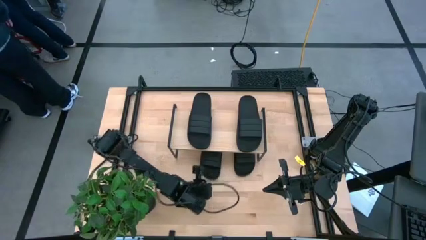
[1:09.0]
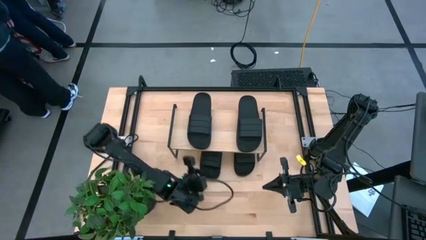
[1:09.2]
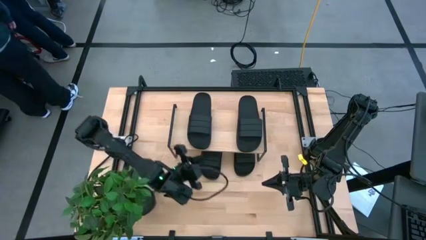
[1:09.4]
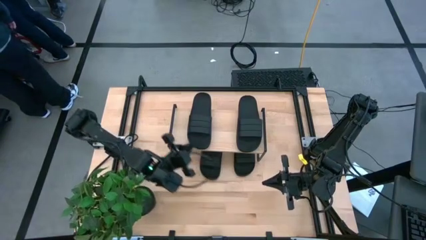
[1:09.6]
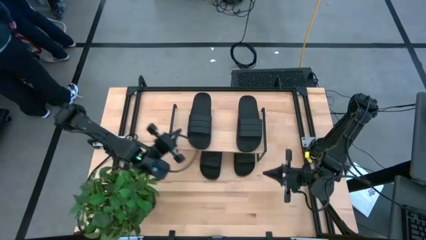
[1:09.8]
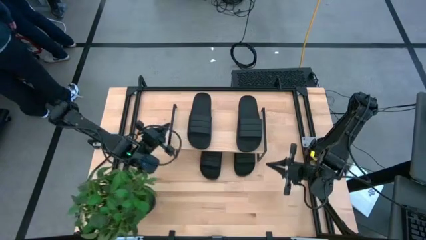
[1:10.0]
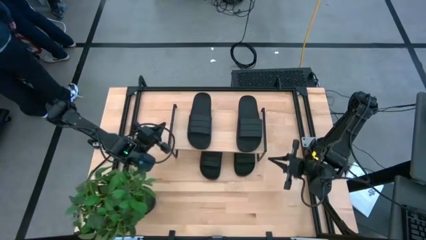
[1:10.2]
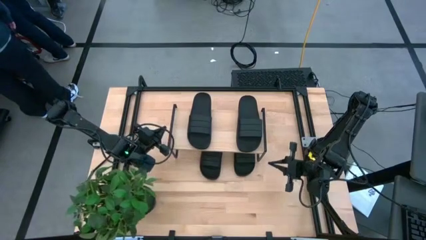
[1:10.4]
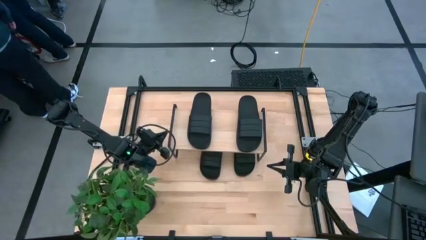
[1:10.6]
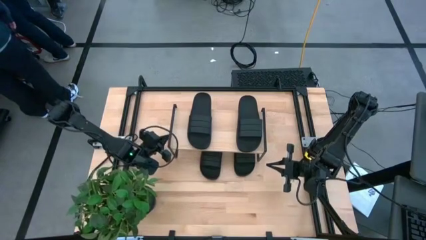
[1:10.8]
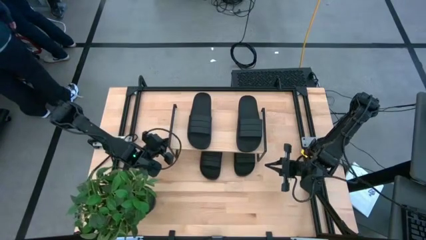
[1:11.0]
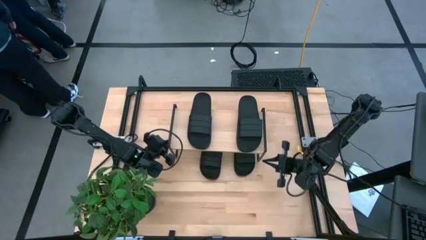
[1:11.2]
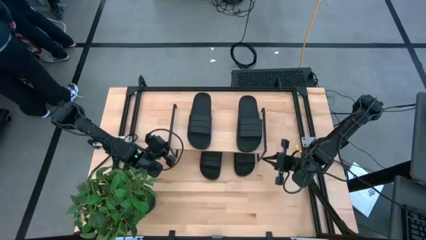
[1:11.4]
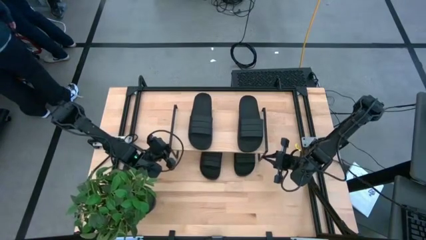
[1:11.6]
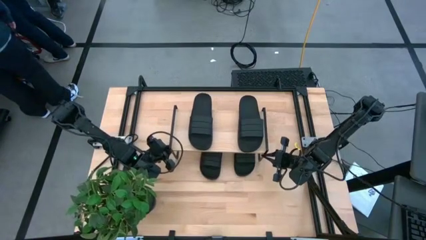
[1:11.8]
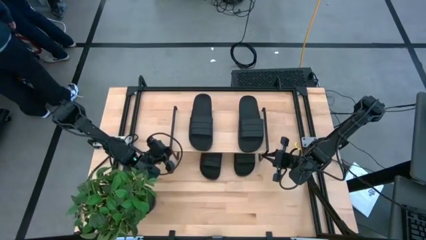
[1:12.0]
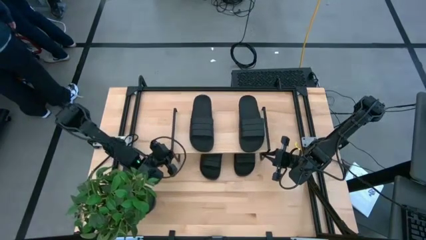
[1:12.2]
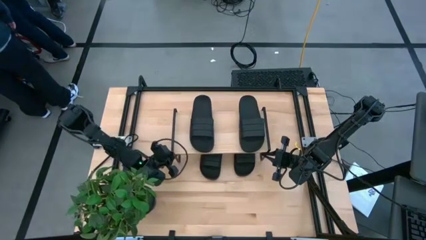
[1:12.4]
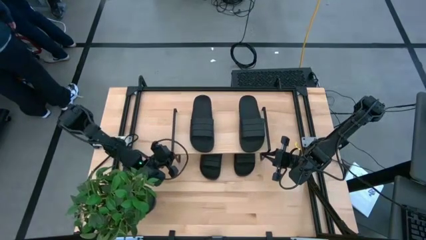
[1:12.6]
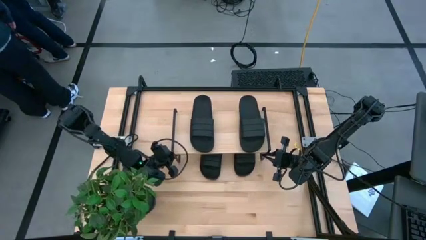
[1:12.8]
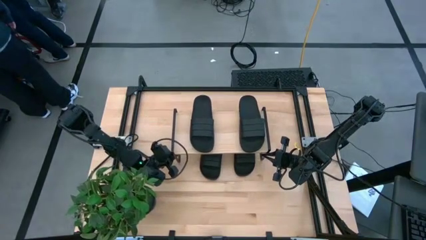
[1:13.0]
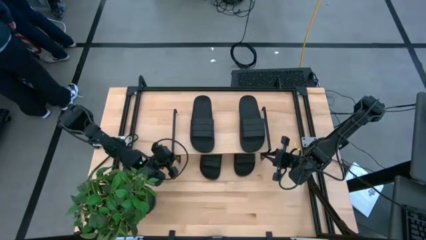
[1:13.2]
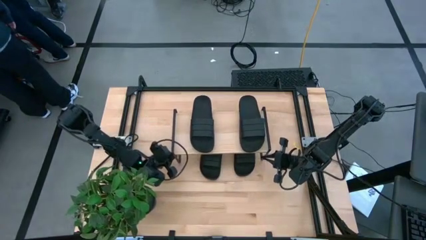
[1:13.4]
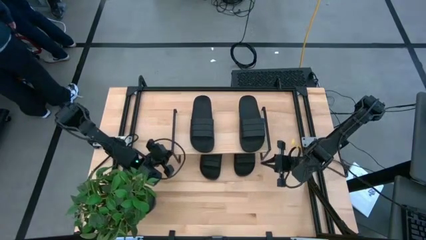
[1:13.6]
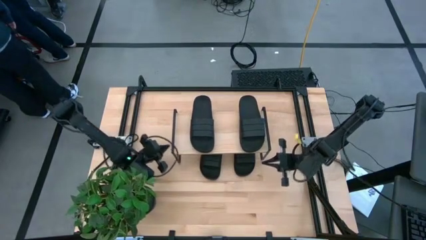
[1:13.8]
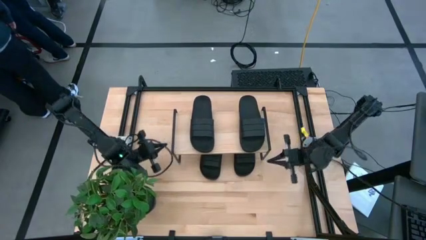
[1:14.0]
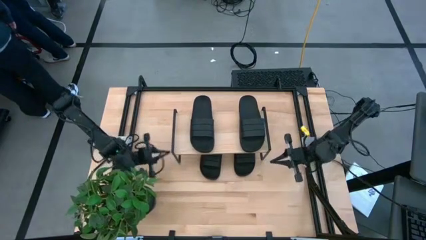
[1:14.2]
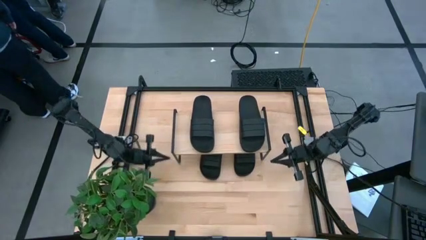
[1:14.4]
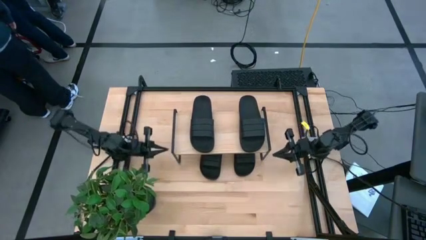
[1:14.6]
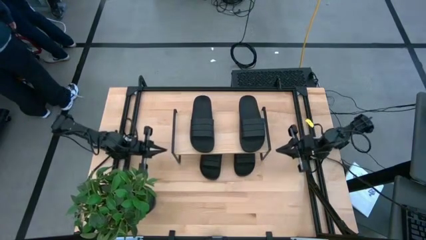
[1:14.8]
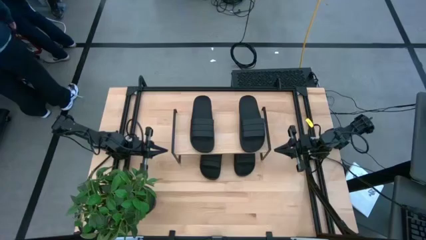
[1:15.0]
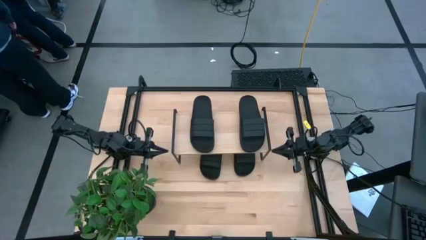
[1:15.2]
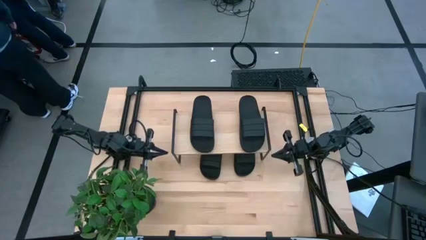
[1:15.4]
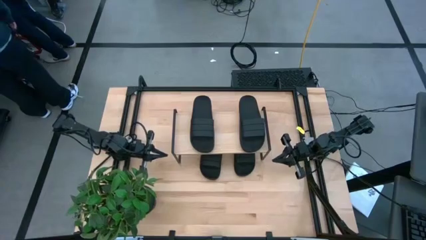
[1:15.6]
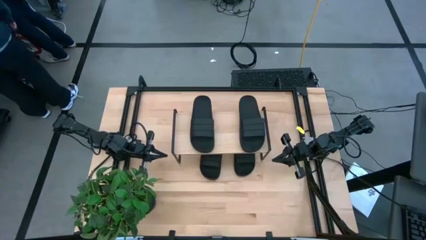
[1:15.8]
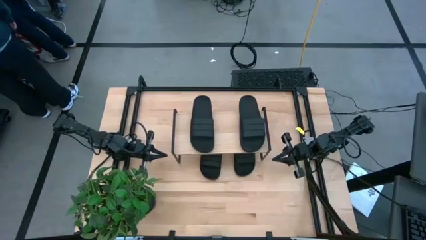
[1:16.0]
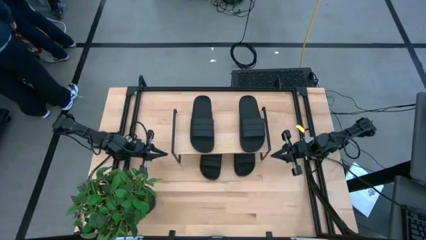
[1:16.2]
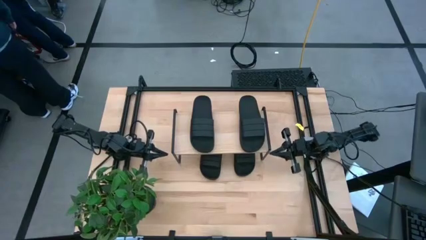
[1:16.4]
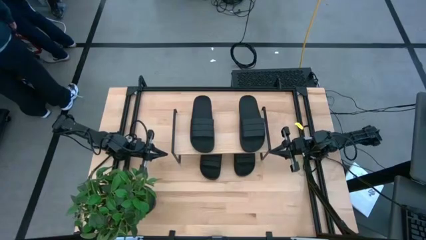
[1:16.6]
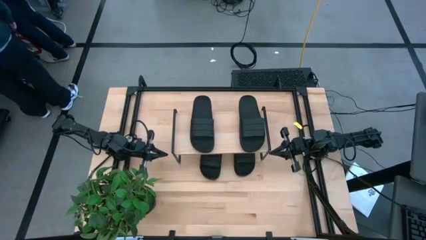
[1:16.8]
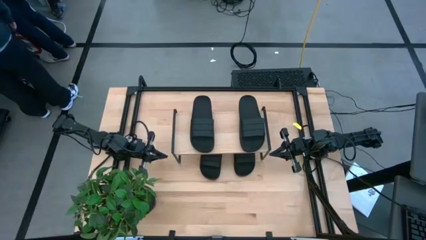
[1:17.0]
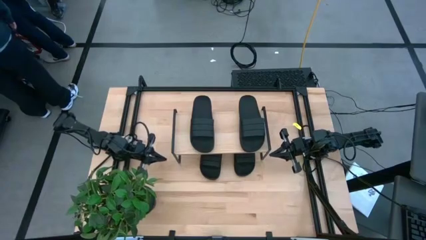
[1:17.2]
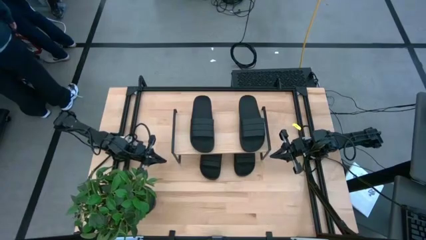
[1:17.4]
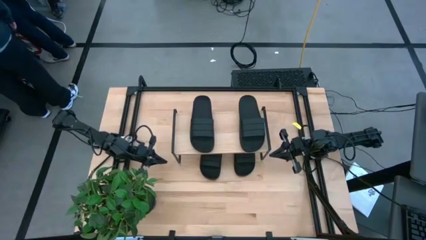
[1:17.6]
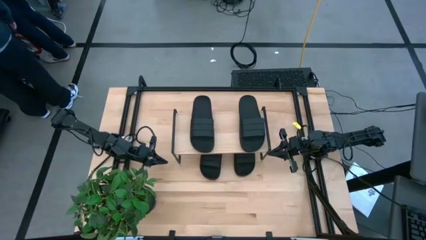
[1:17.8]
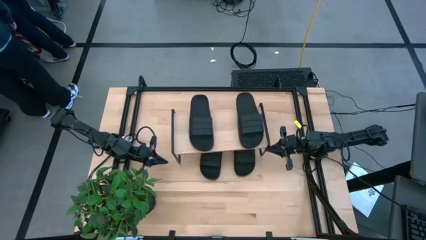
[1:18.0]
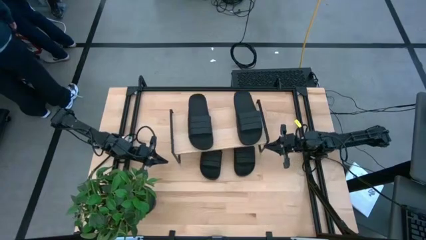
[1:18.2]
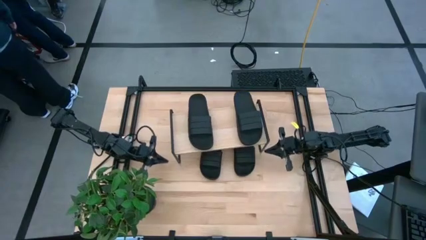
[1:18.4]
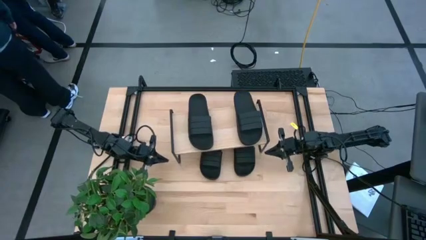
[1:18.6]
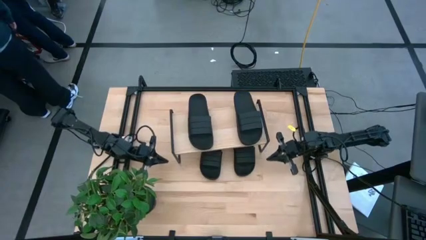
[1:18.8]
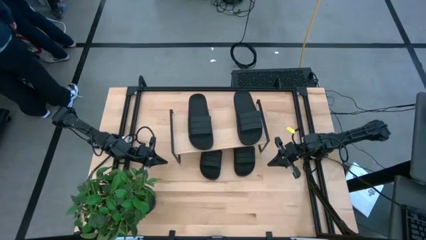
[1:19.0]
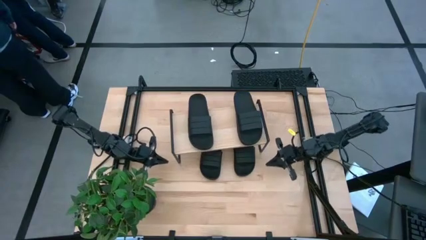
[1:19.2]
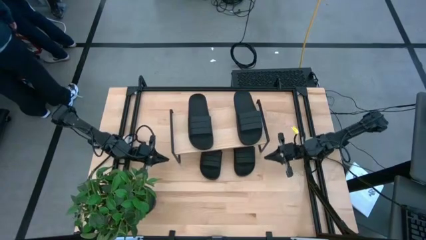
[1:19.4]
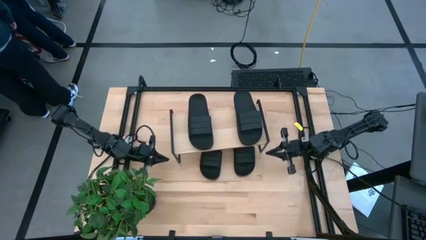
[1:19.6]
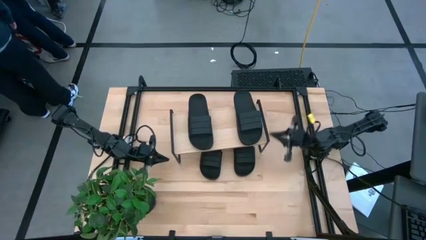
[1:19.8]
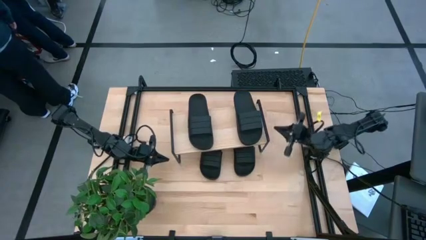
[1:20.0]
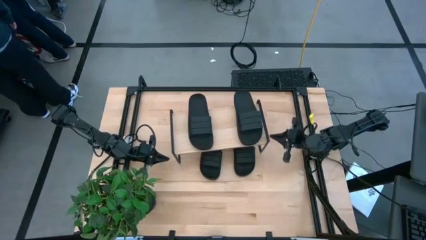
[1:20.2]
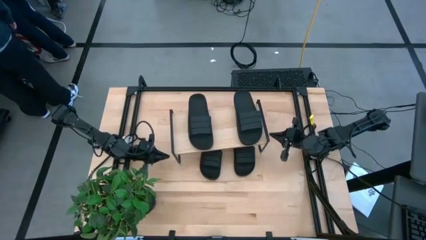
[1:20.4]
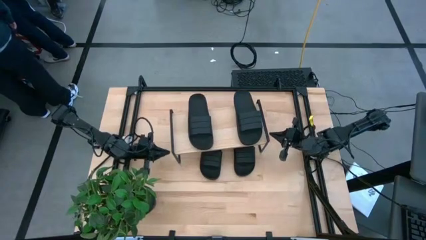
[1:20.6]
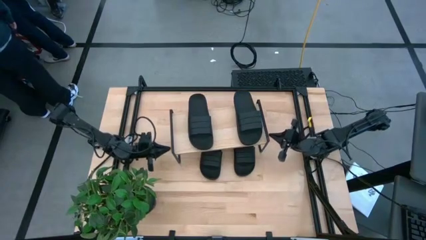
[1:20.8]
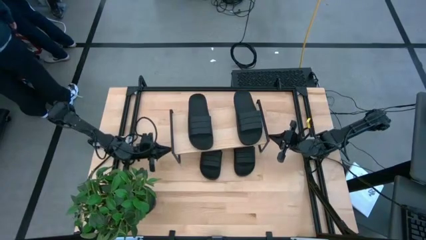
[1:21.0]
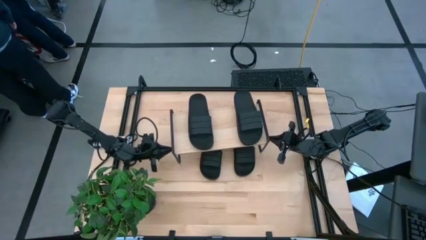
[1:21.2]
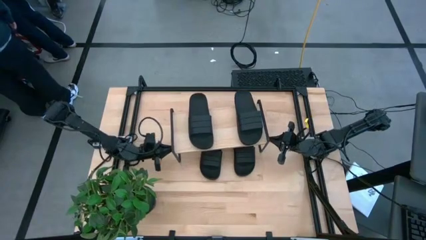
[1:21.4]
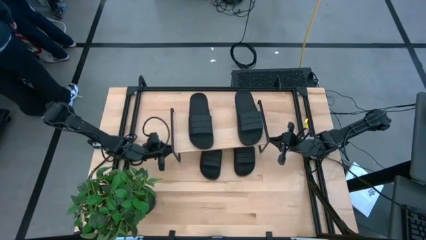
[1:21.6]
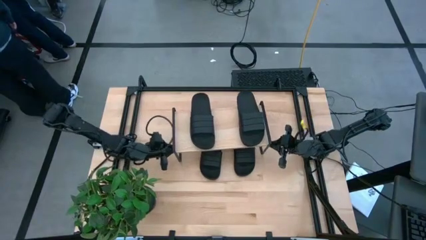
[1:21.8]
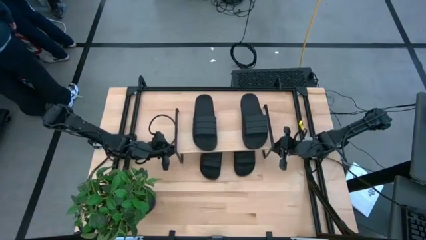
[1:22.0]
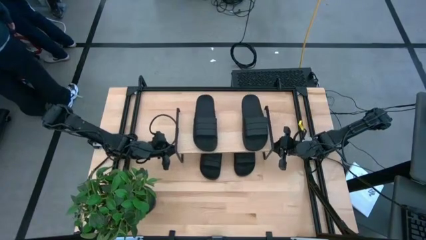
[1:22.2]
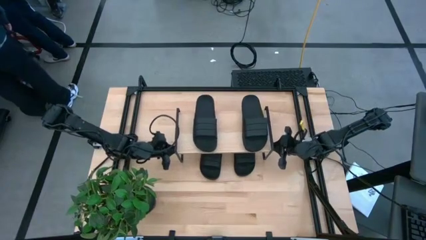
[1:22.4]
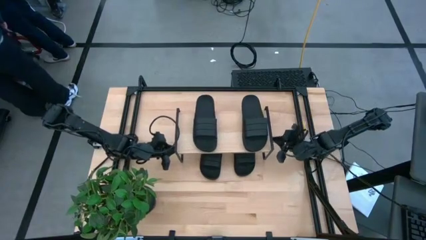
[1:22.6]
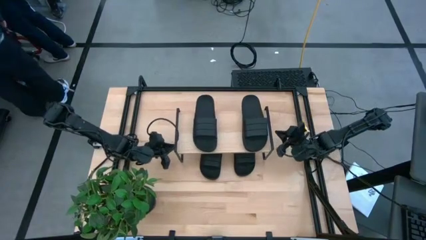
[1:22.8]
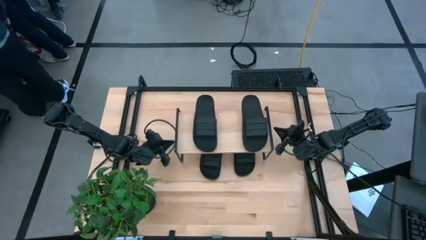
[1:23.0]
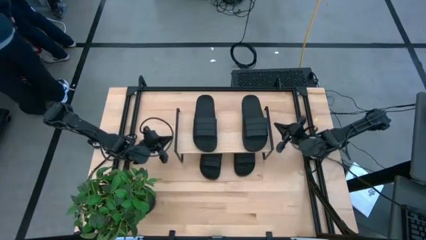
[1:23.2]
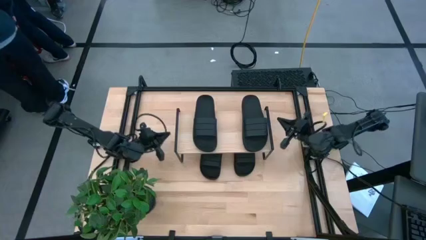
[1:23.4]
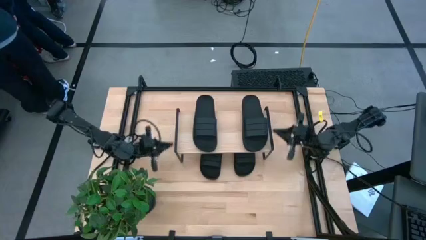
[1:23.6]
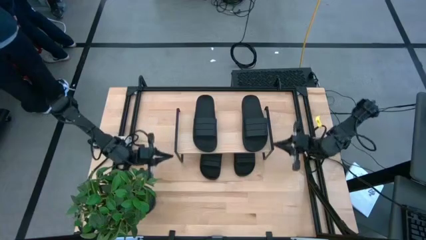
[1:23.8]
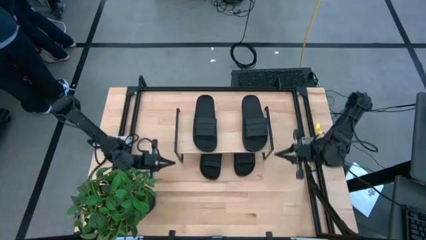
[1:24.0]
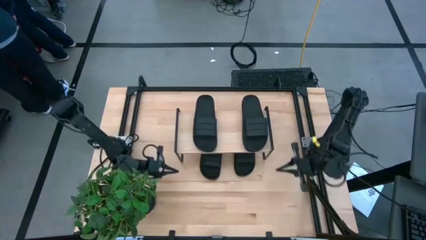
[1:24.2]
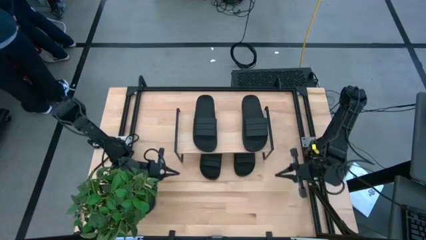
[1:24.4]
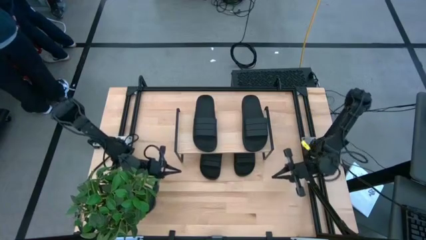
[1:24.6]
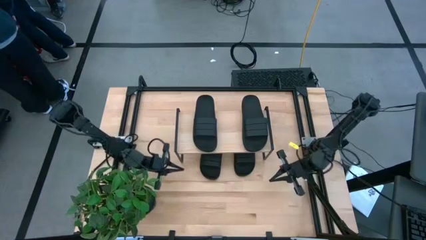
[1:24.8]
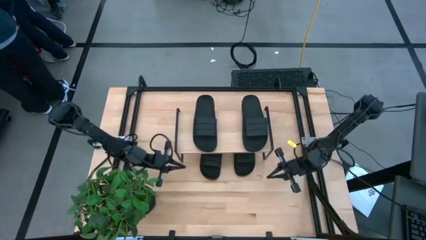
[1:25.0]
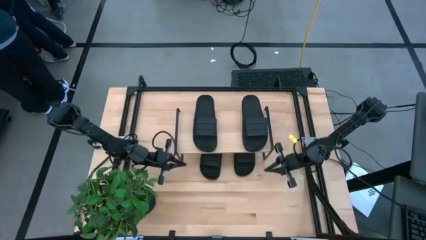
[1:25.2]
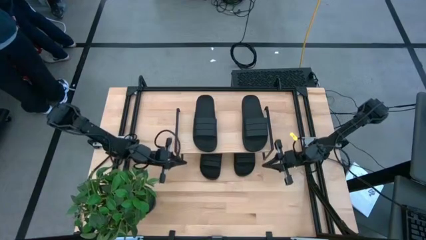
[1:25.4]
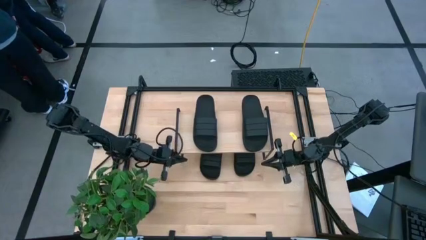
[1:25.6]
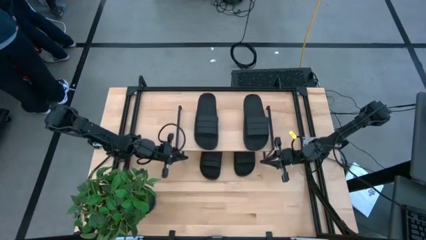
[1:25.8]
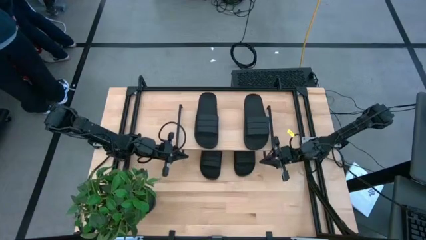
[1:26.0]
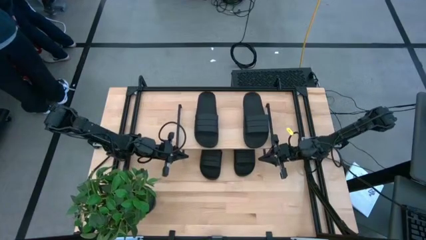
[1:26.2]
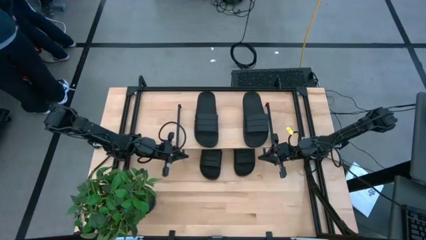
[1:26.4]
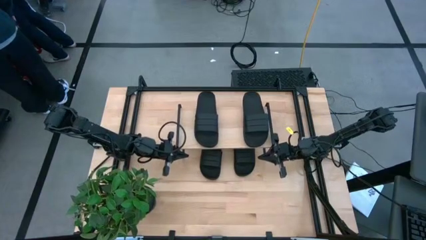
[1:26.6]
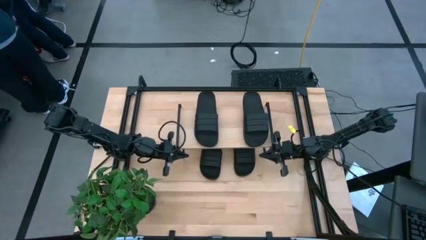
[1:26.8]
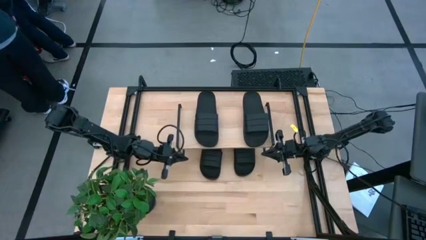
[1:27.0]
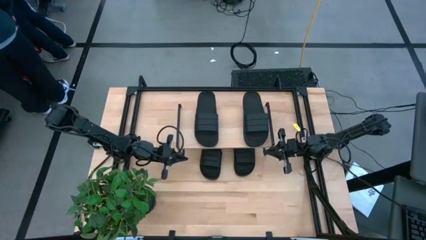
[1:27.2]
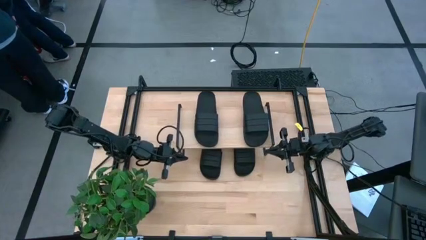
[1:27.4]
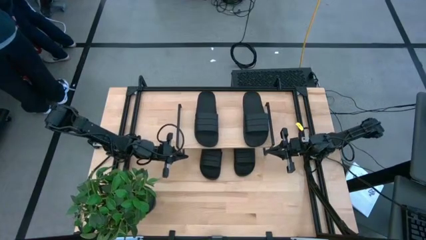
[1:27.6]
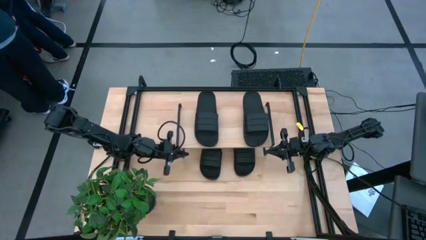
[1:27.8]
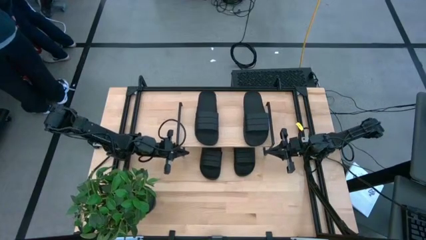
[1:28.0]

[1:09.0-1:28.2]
Task: Pick and place slides into the shelf
Adjust the shelf
